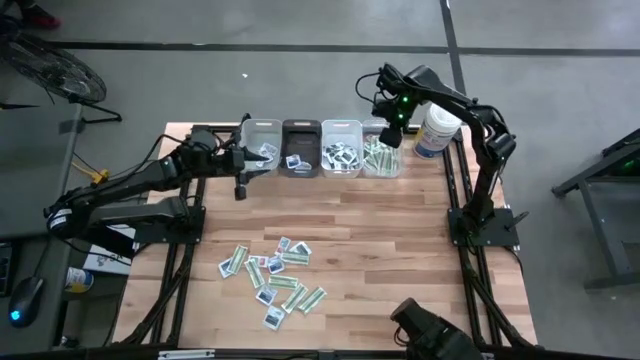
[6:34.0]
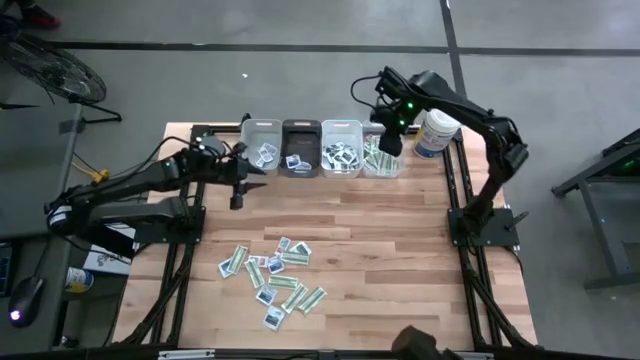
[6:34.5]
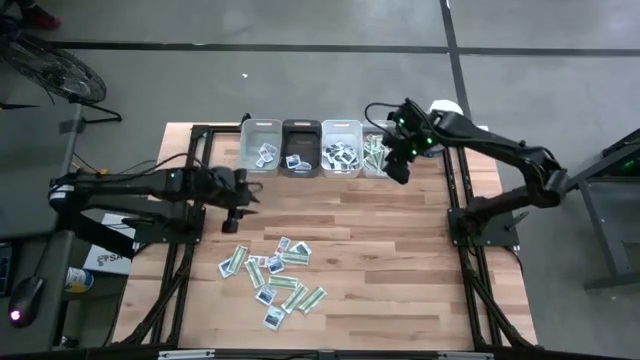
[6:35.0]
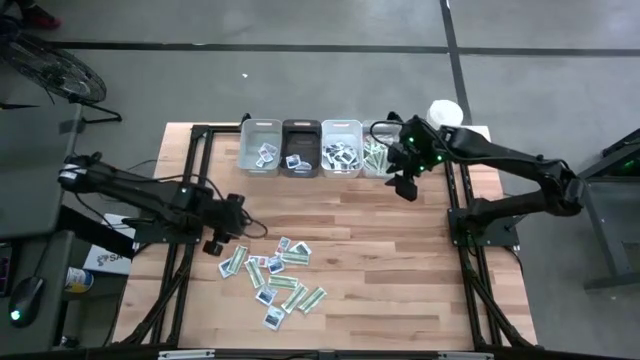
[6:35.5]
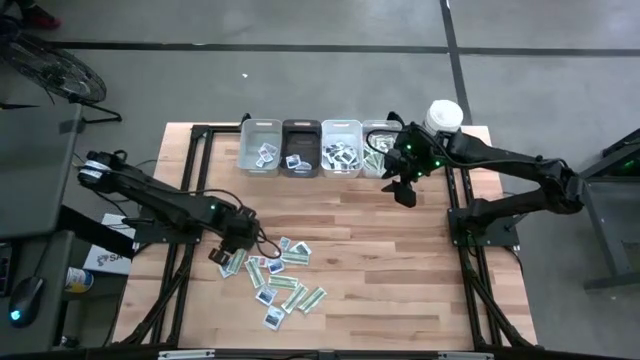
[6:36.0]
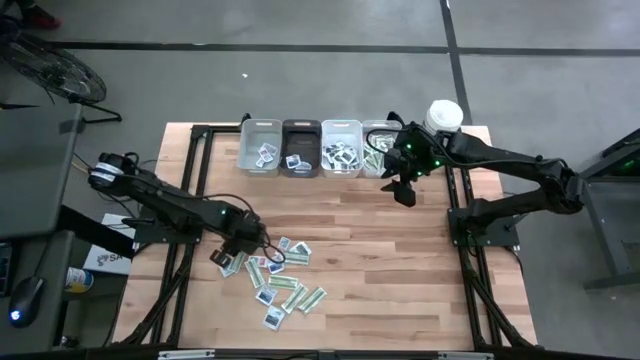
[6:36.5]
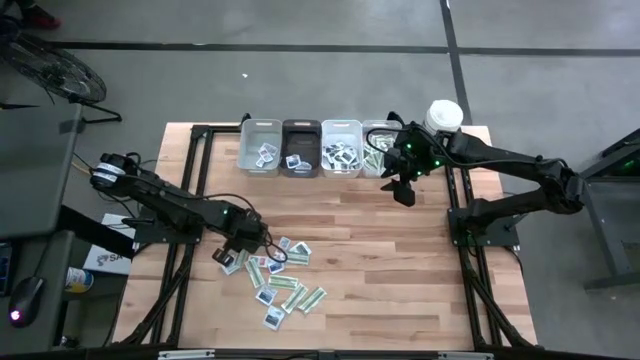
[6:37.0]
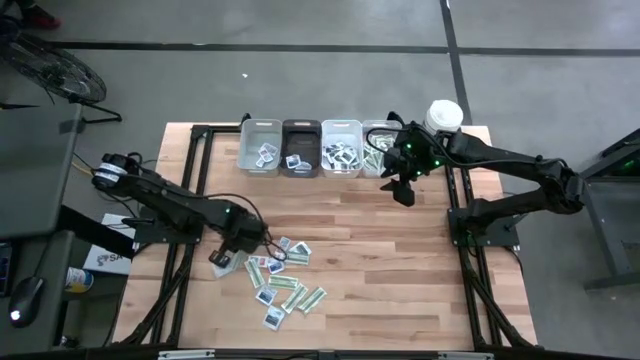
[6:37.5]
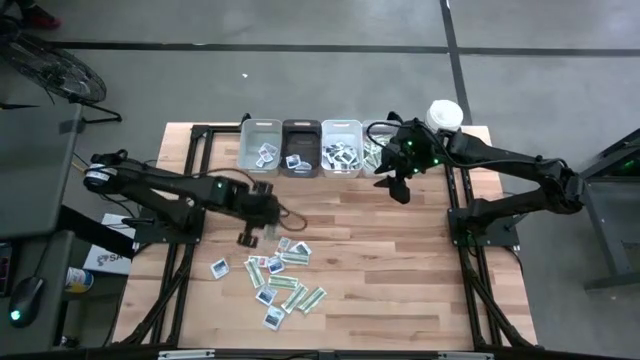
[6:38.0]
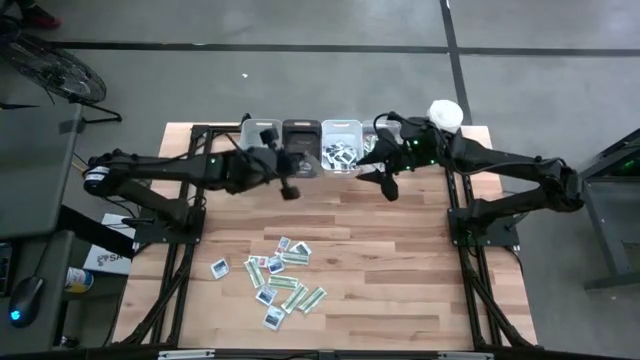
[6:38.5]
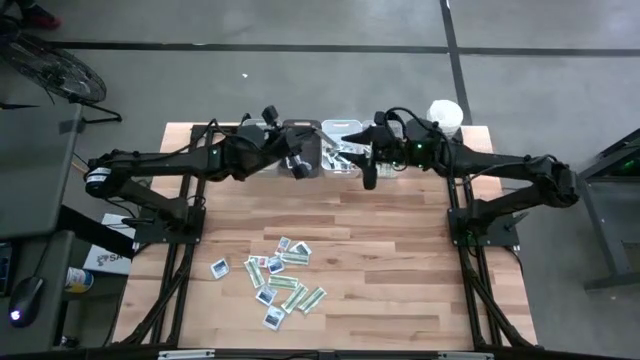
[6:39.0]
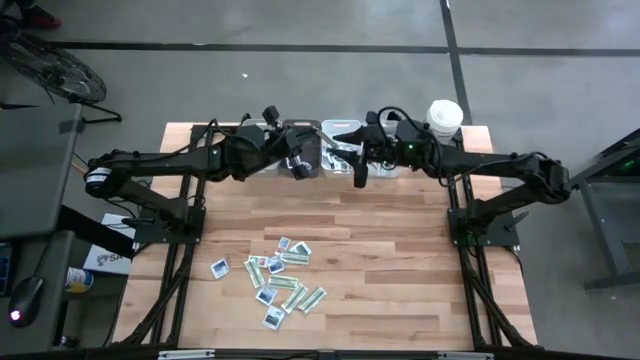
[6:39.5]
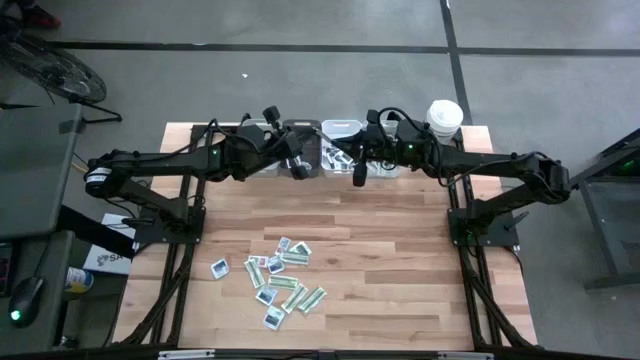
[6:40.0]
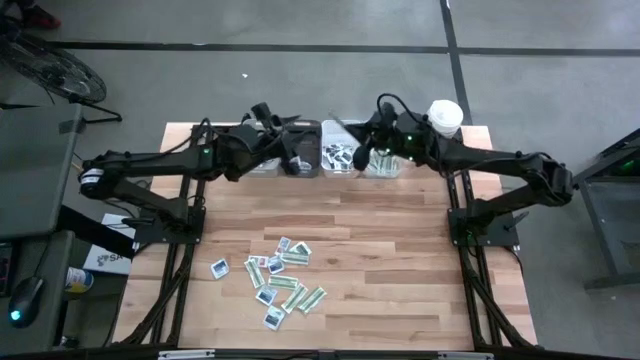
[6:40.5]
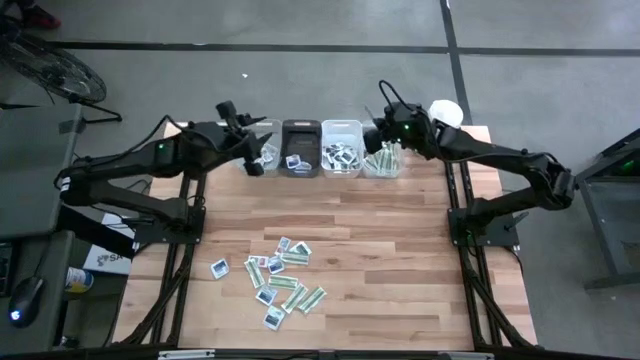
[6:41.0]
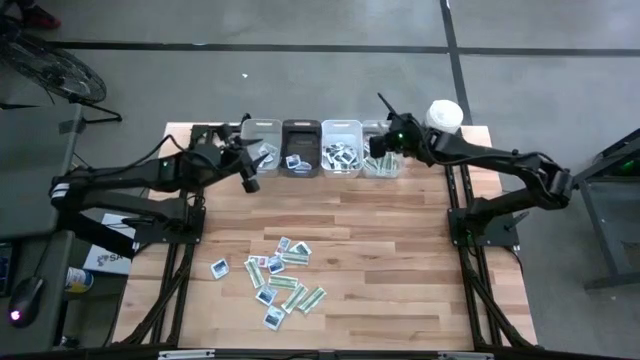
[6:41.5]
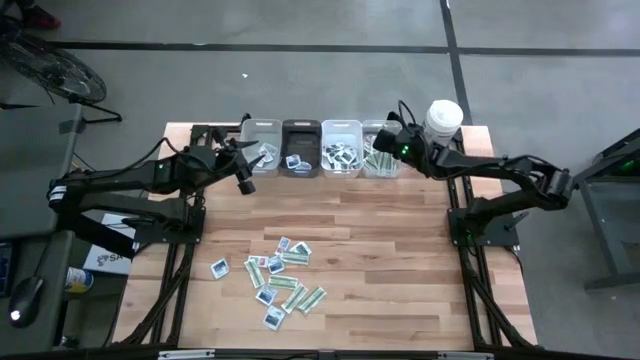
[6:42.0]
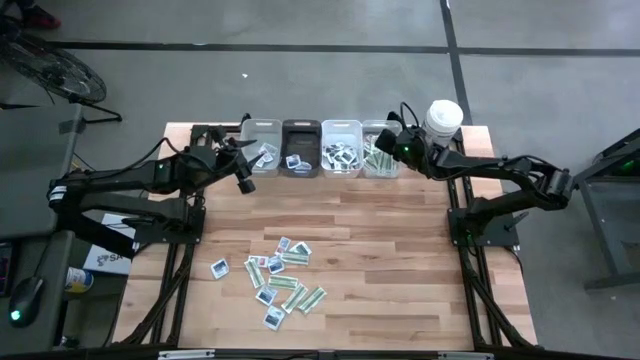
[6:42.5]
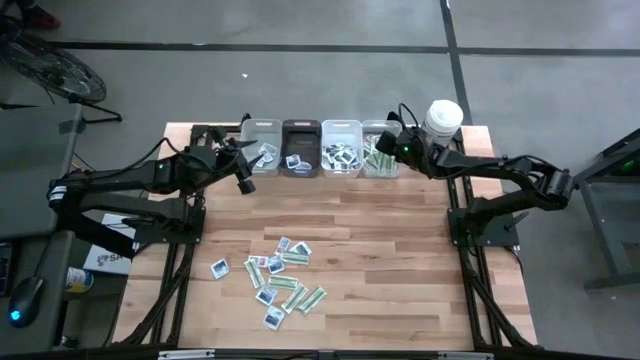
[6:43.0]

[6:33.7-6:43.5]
Task: Pick & Place First Aid Supplies
Put the green bandage into the transparent bin

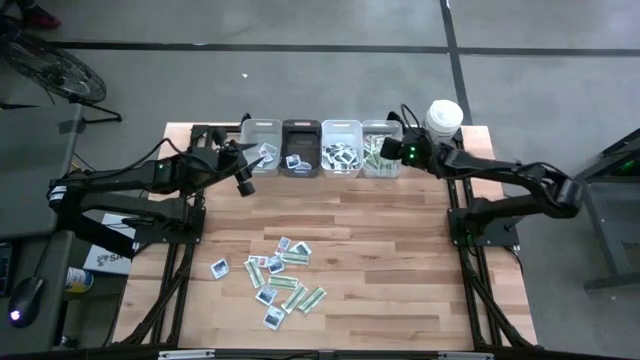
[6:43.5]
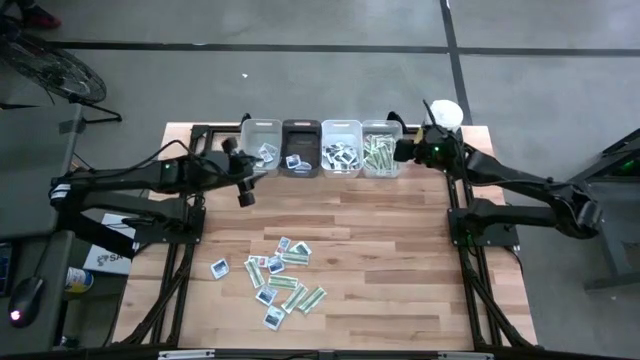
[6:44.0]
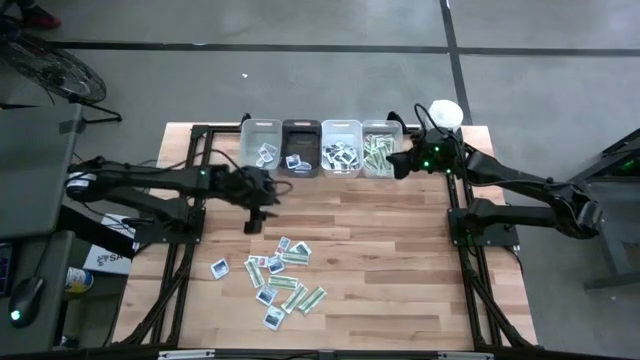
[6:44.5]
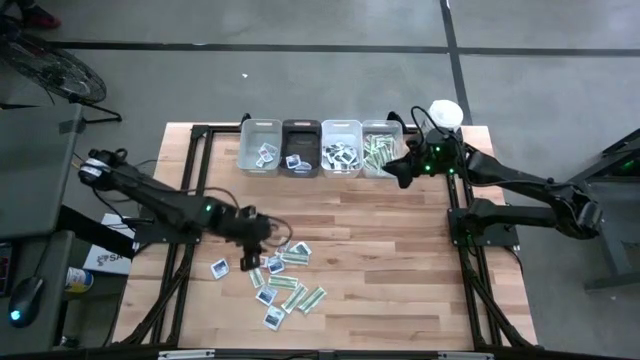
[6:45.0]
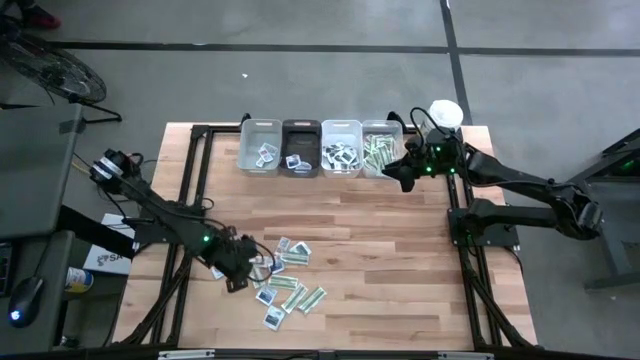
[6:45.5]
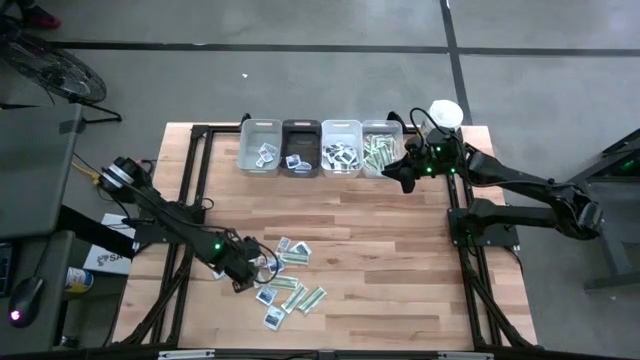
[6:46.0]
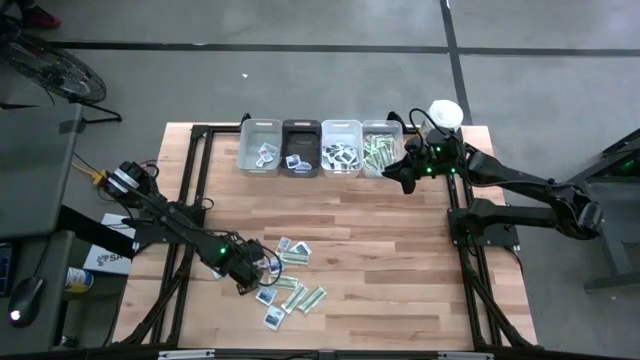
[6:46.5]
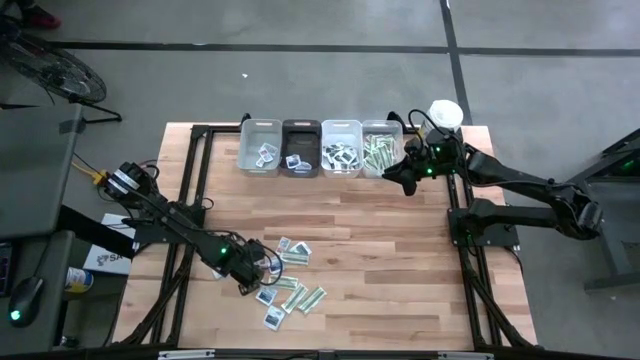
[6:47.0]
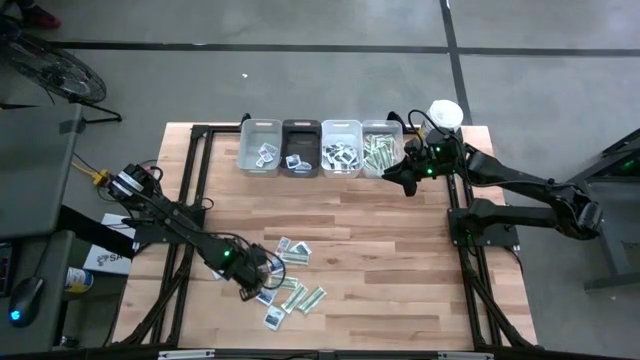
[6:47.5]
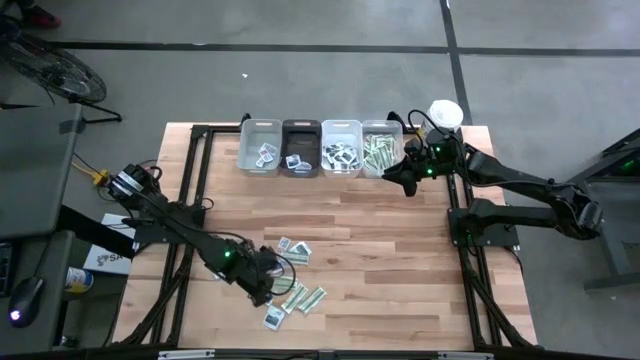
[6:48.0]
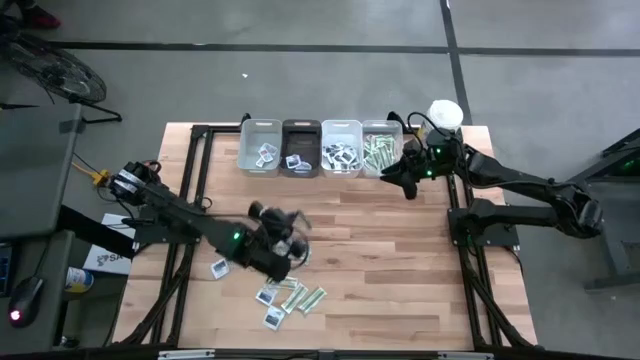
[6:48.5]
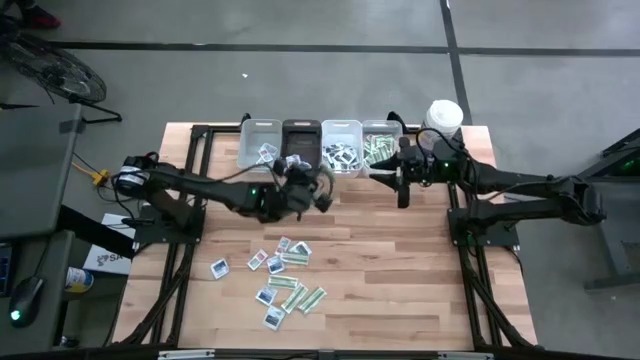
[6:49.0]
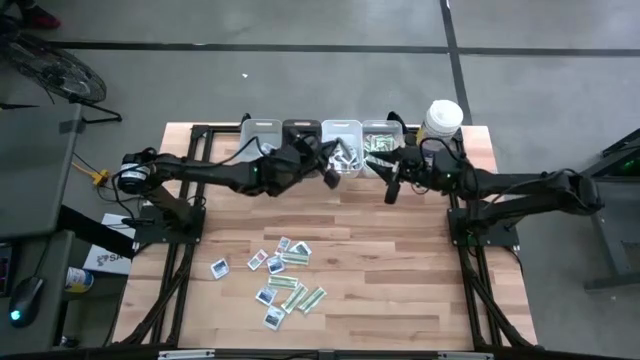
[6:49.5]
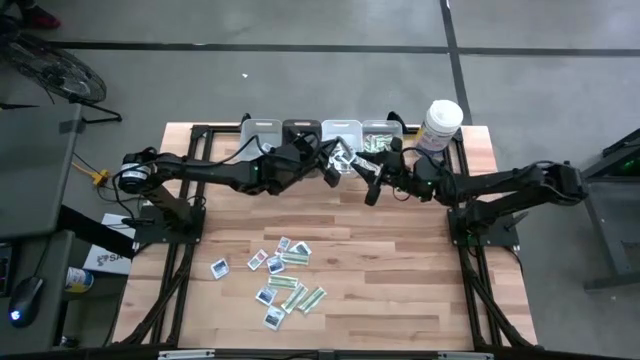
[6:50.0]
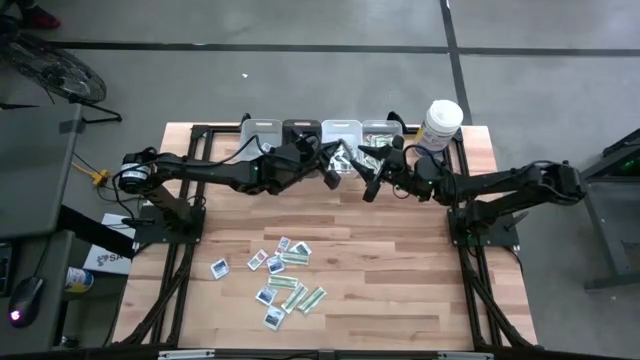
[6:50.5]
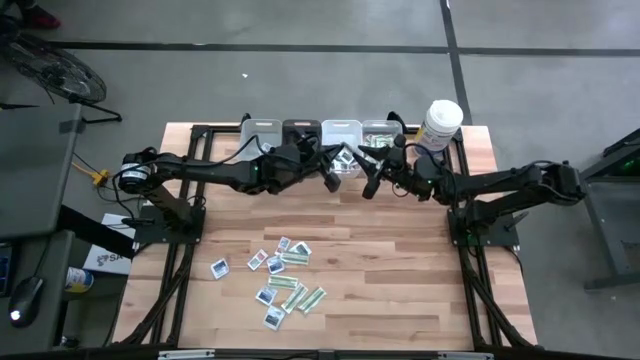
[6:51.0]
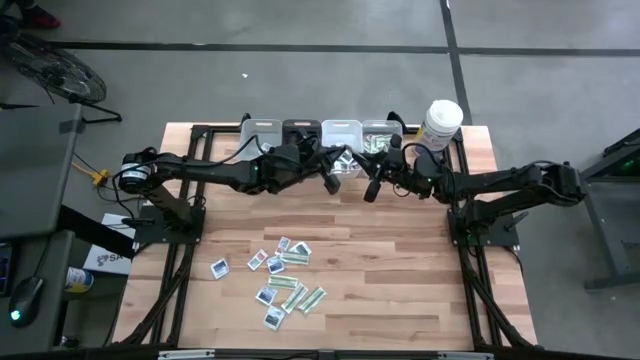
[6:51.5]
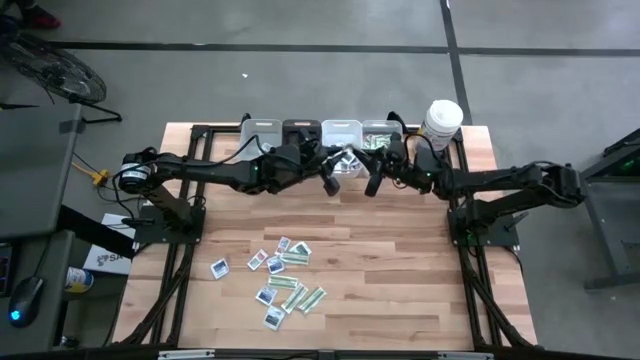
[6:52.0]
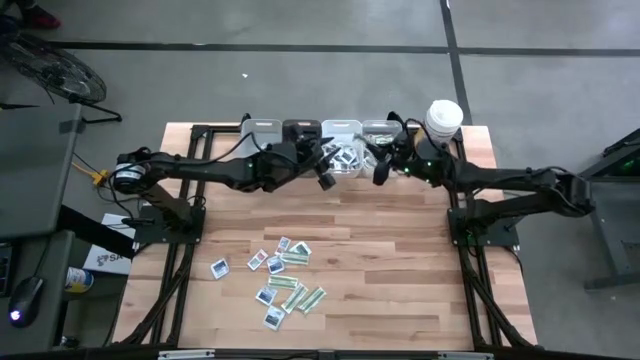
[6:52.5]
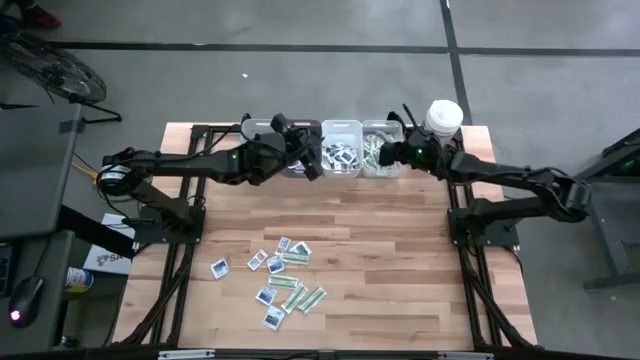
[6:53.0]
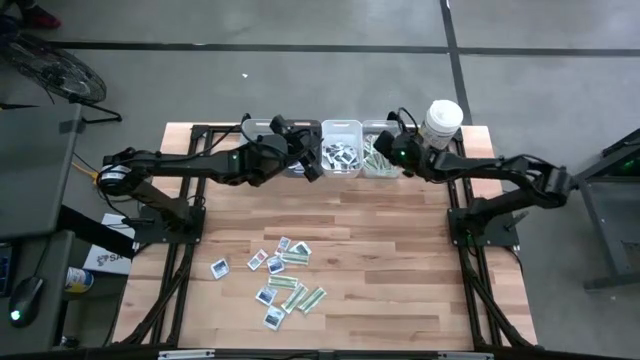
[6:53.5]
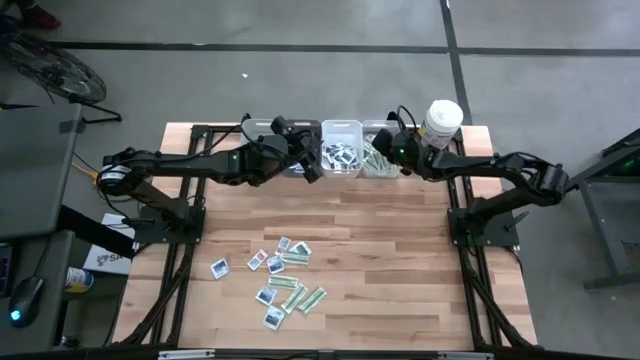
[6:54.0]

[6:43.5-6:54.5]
Put the green bandage into the transparent bin

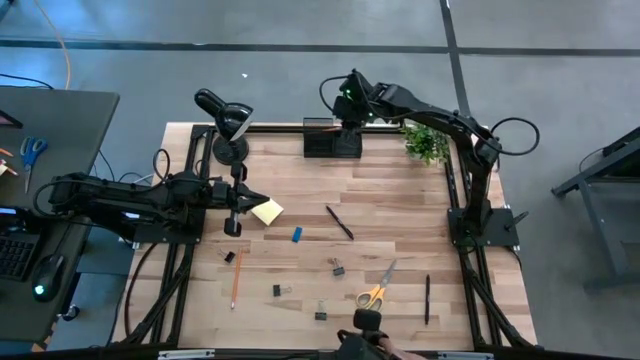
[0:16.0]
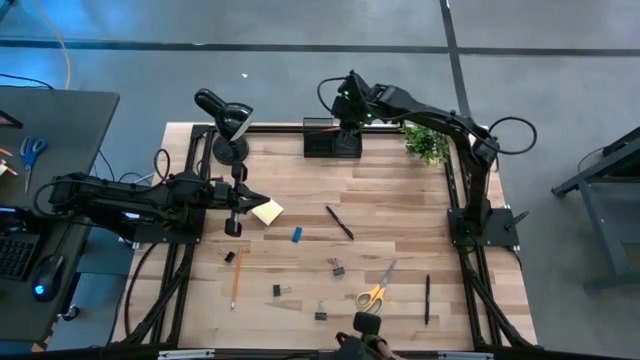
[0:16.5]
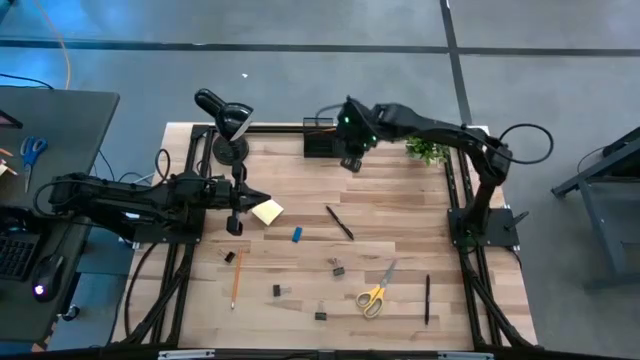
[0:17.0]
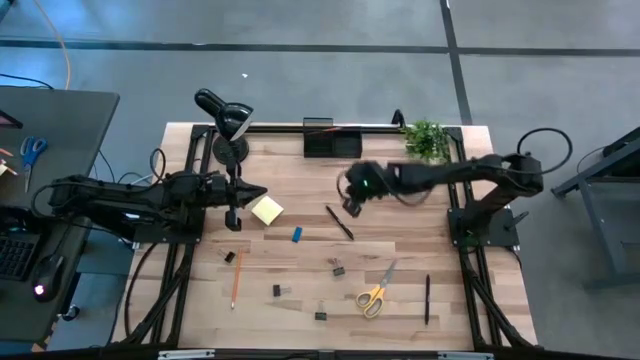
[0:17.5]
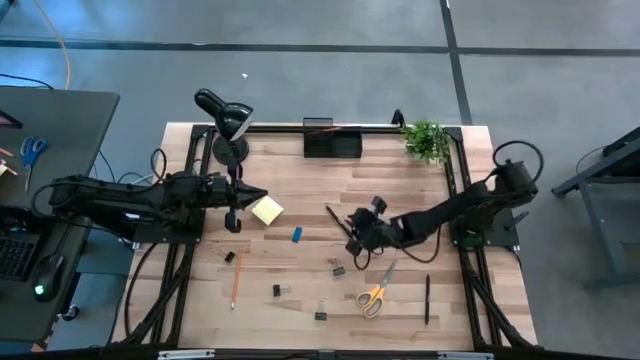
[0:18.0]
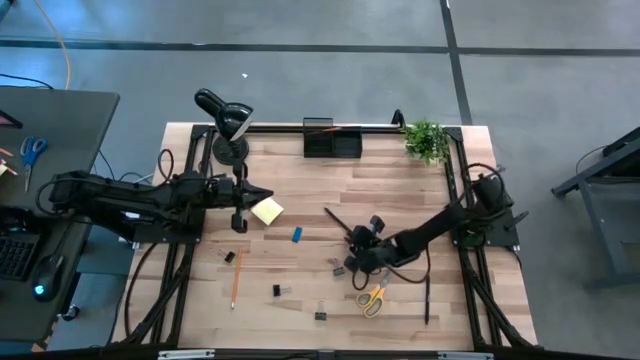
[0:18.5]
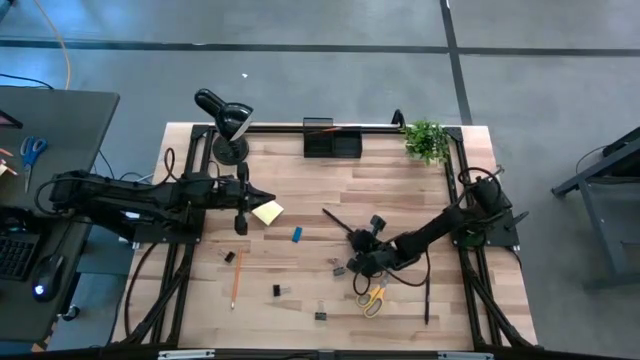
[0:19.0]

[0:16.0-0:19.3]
Task: Pick and place office supplies into organizer
Put the black pen into the black desk organizer
